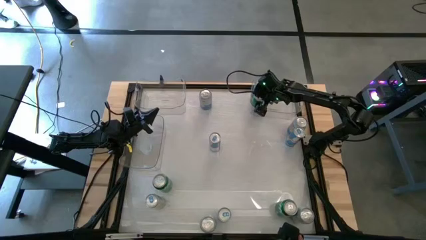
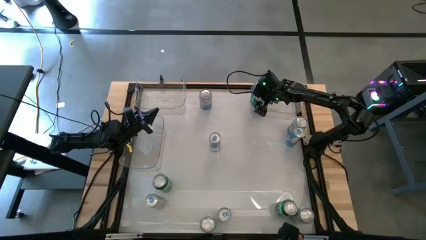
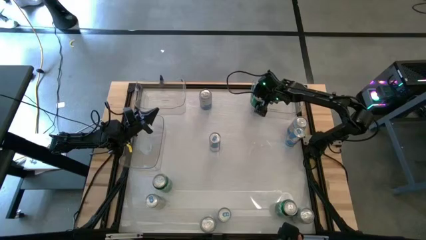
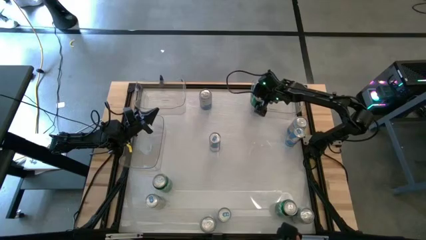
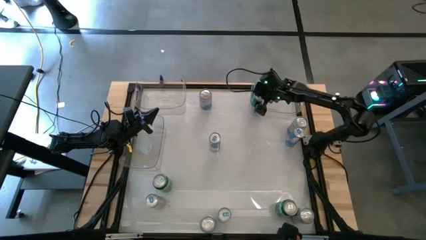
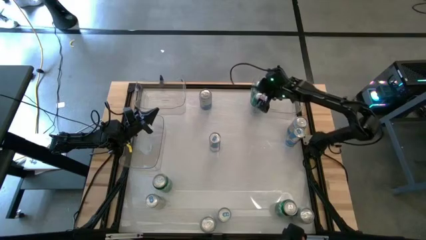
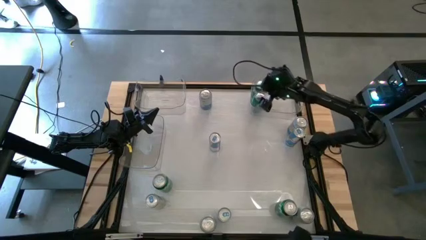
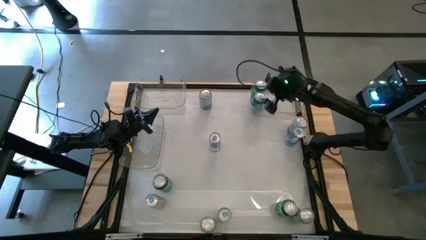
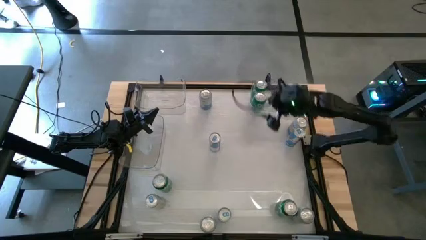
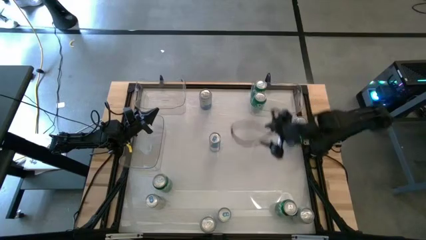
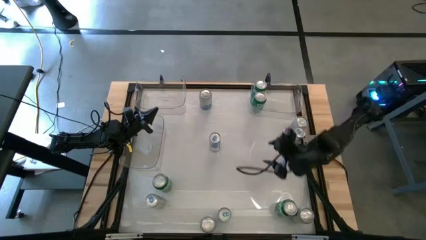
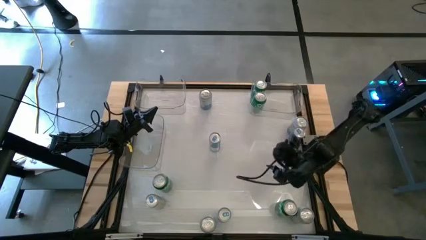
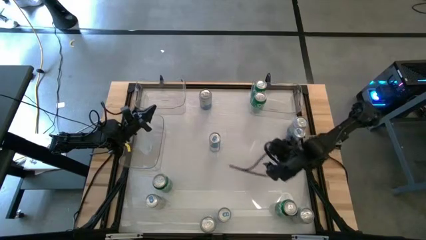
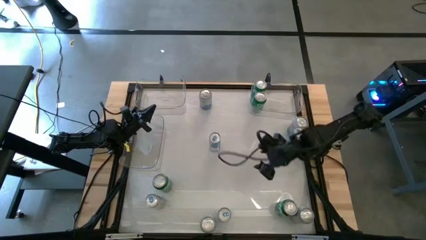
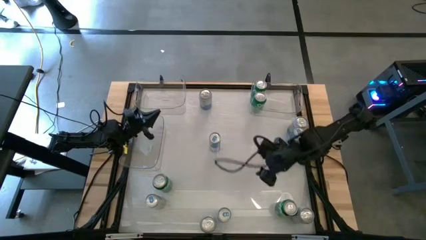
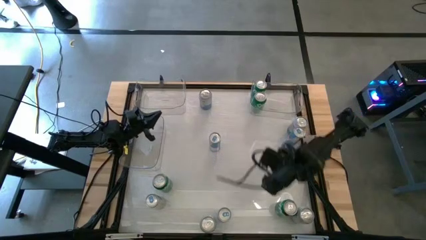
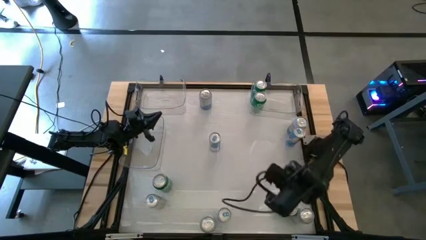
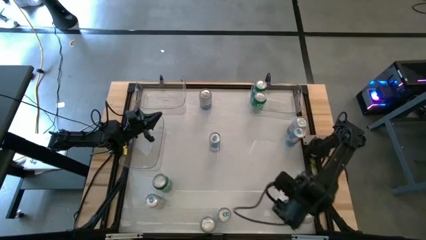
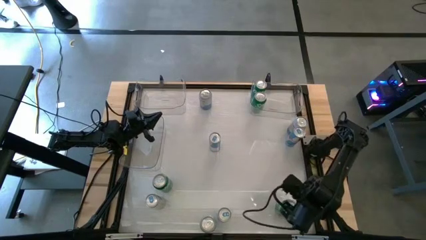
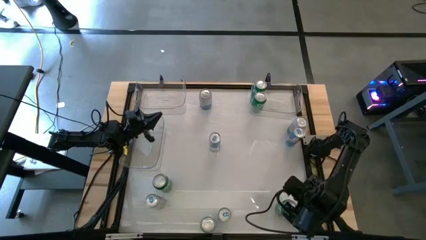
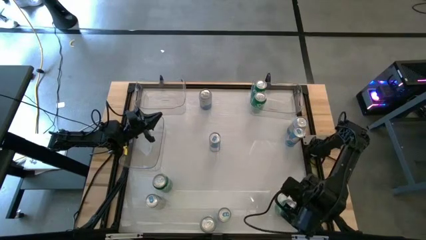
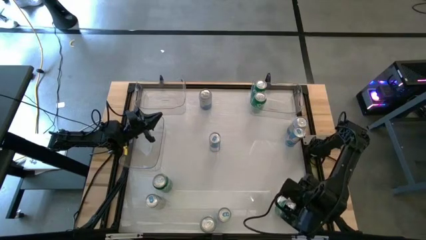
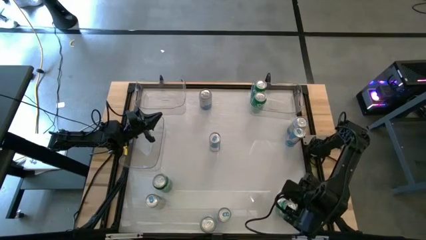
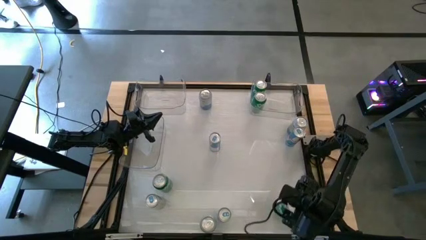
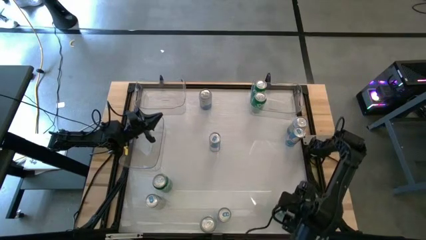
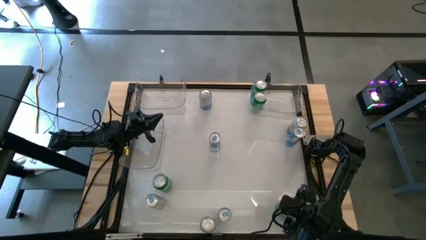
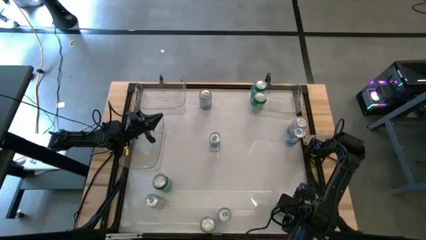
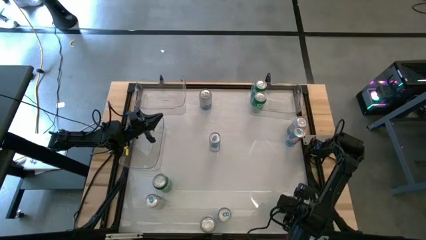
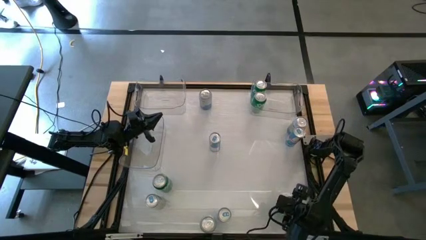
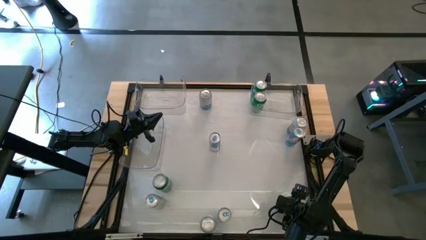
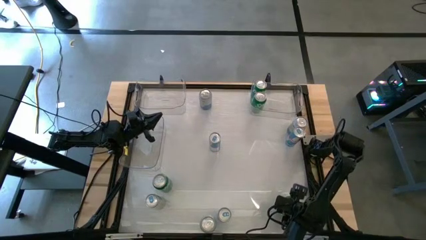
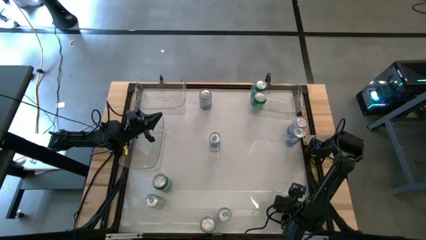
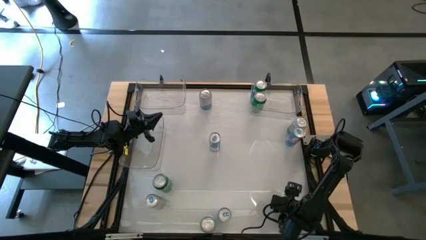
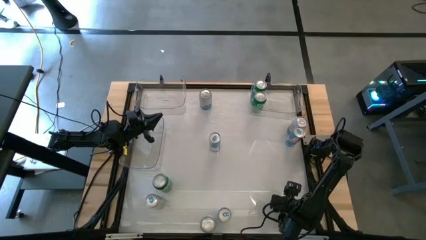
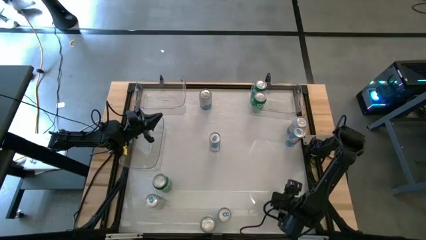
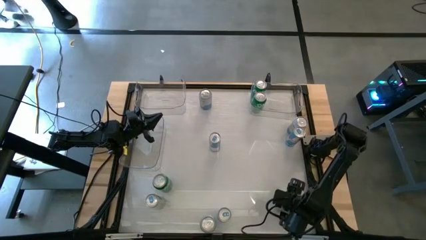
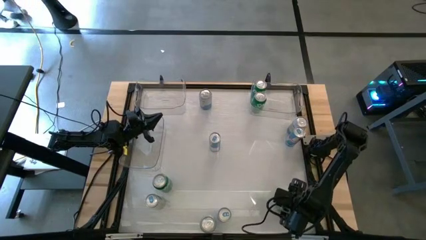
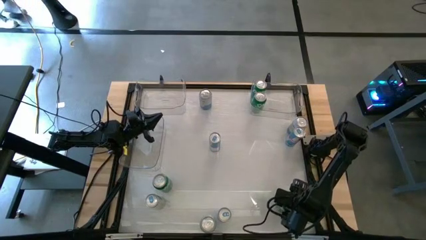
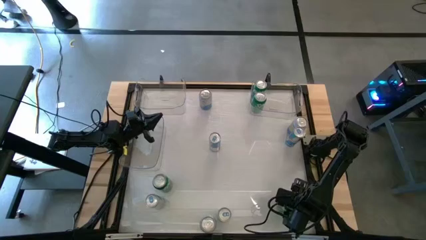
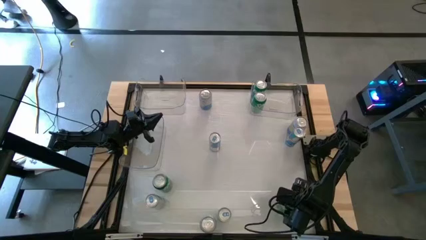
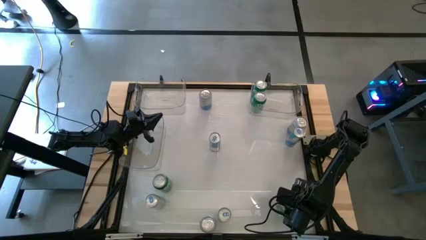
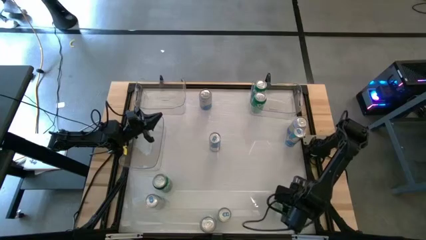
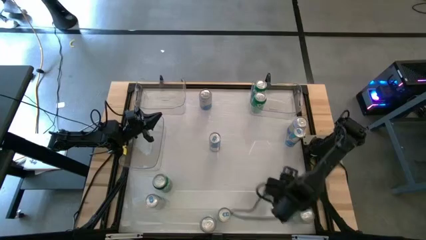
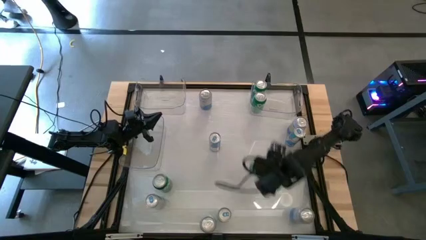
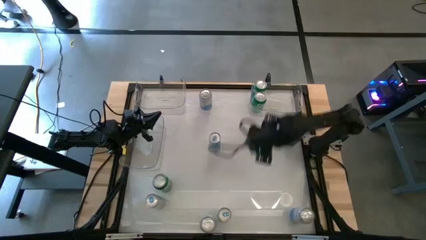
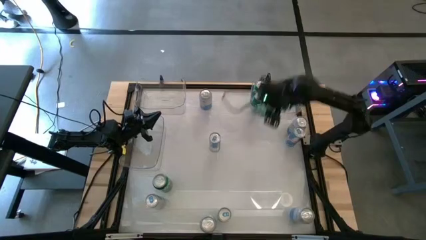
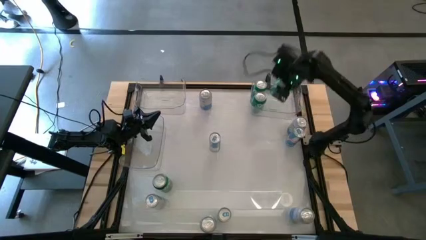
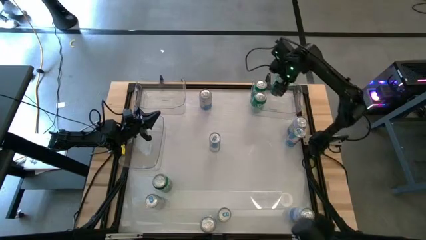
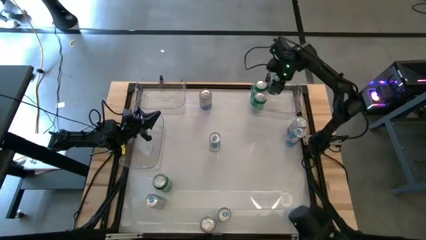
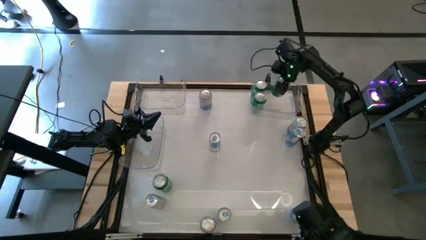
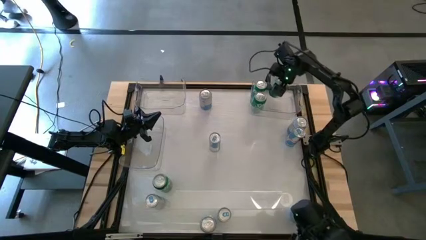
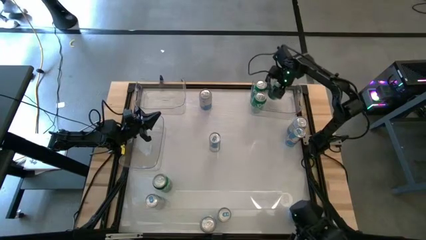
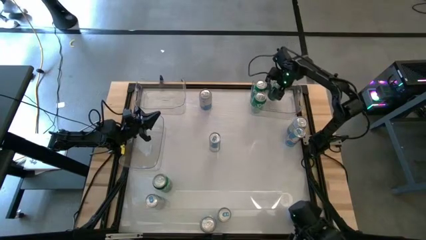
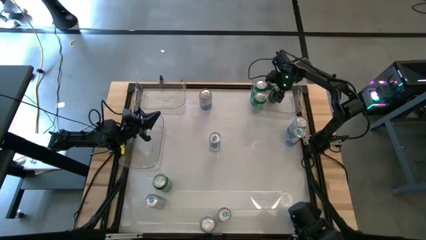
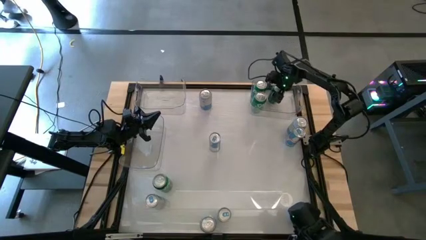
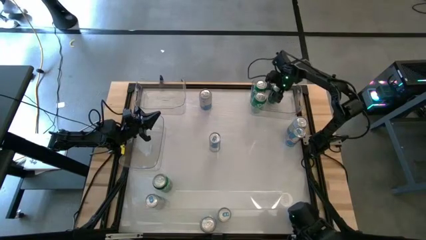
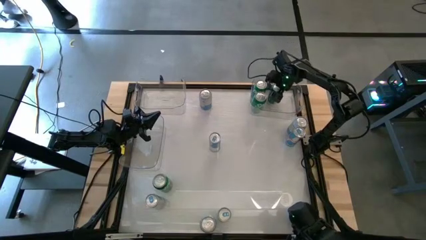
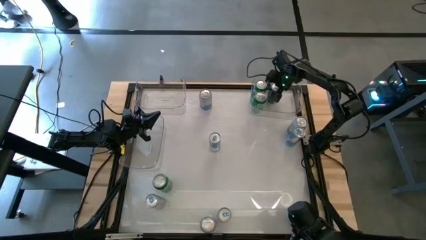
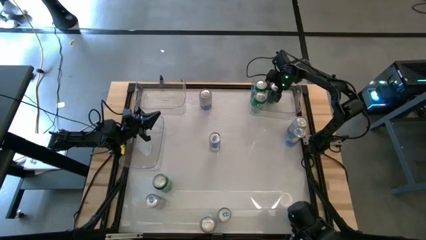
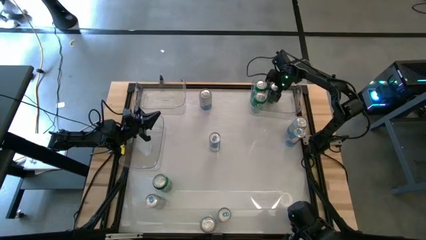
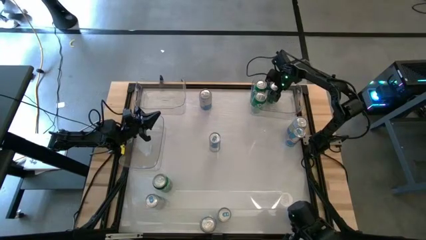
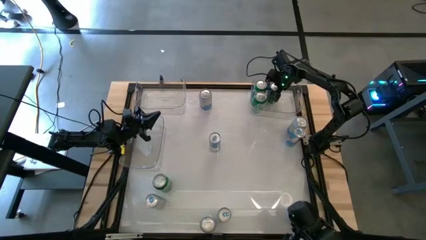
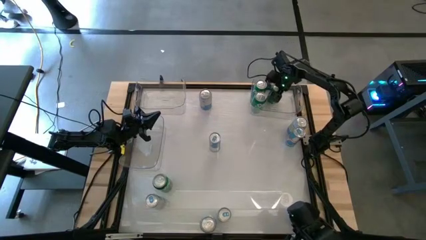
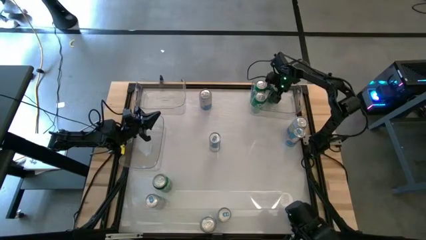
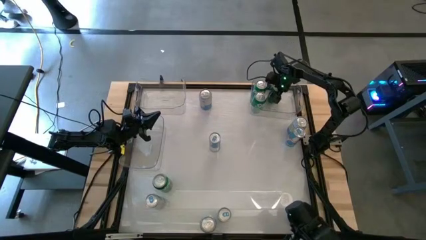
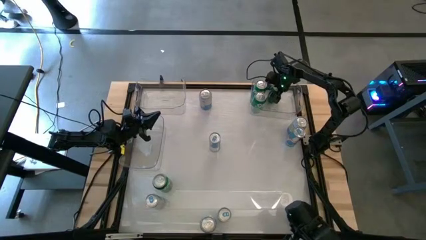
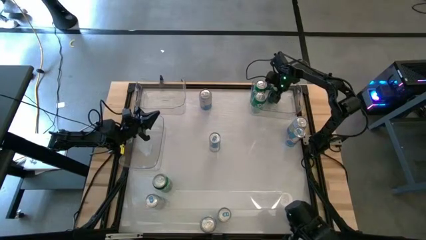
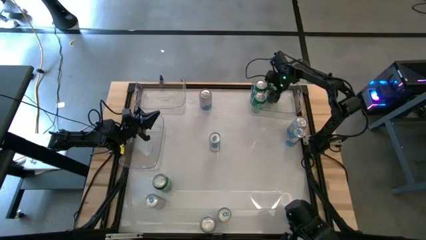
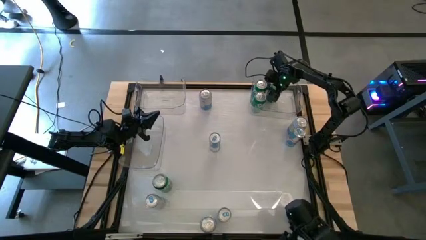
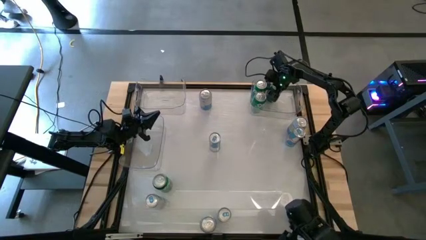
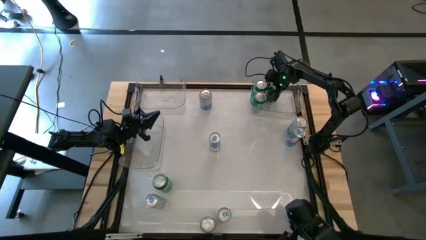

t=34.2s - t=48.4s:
Task: Sort soda cans
Put the bottom right green soda can into the top right transparent bin

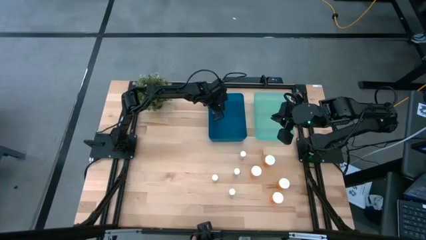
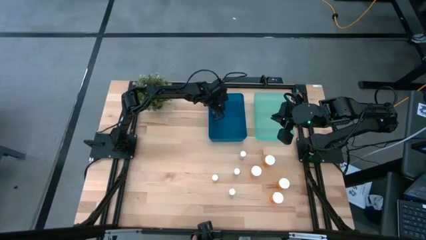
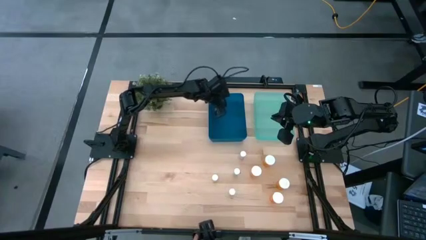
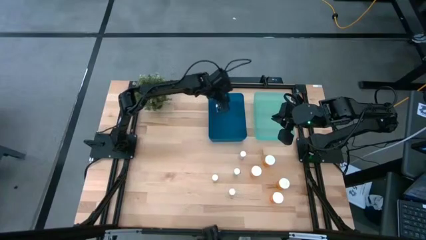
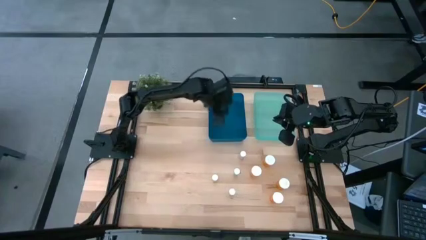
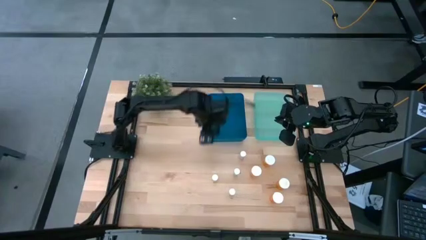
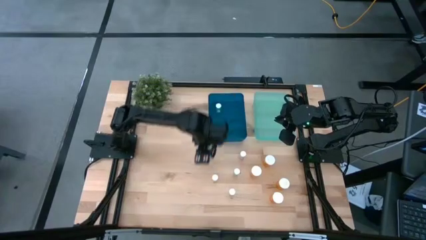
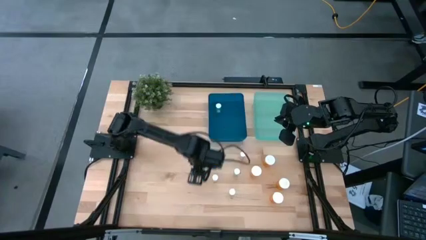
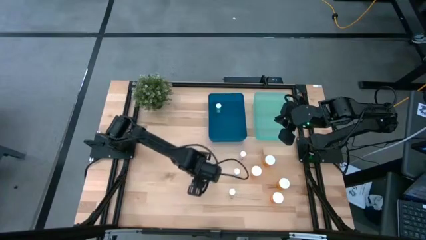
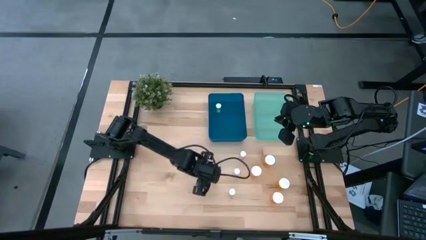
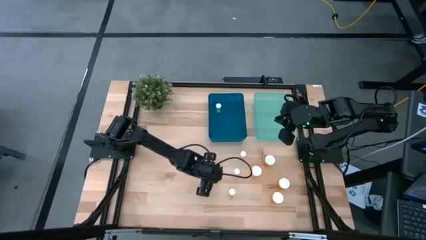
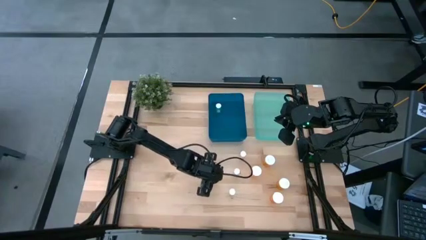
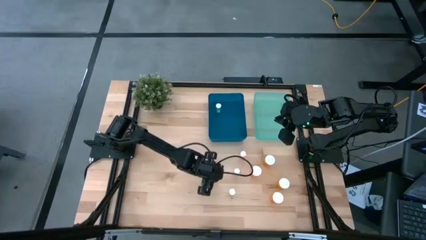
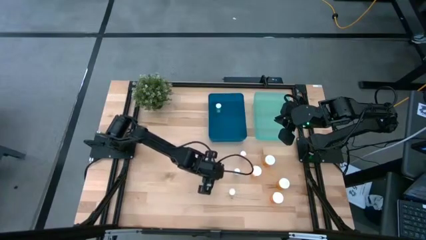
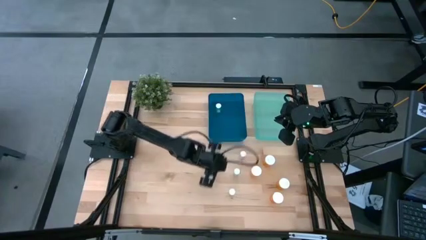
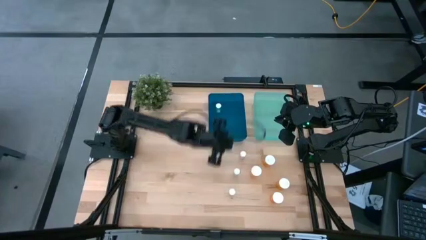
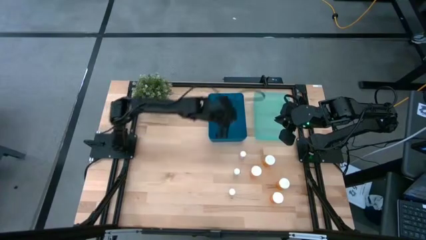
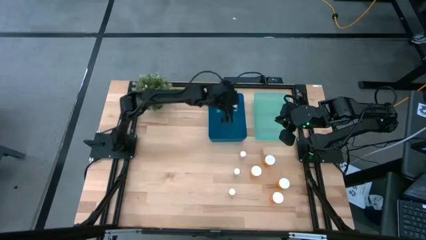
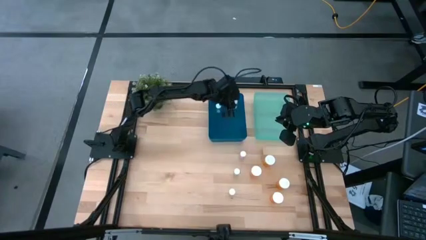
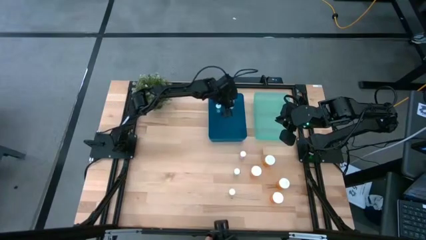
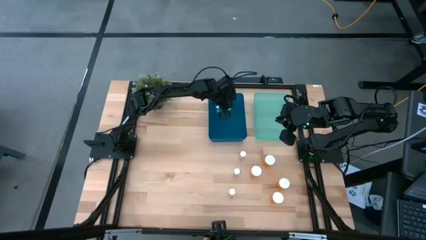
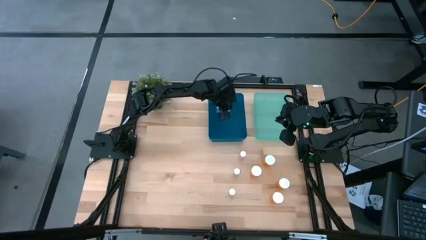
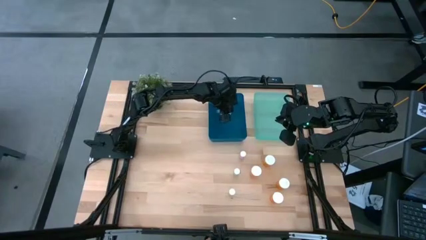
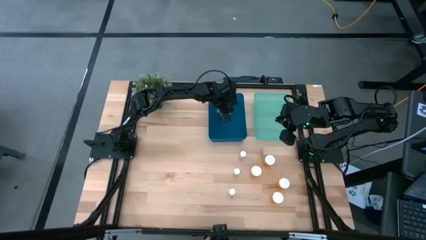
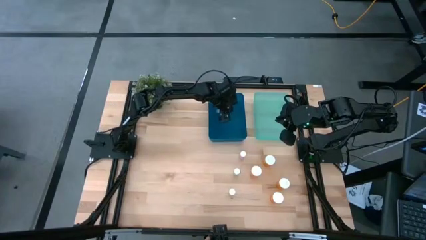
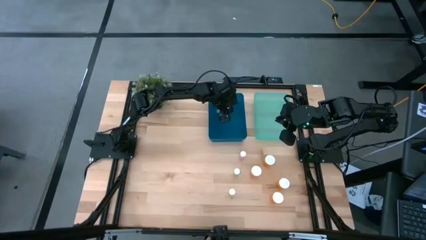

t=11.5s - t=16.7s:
Task: Pick and place medicine bottles into bin by pill shape (circle, oval)
Put the top small yellow pill bottle into the blue bin
